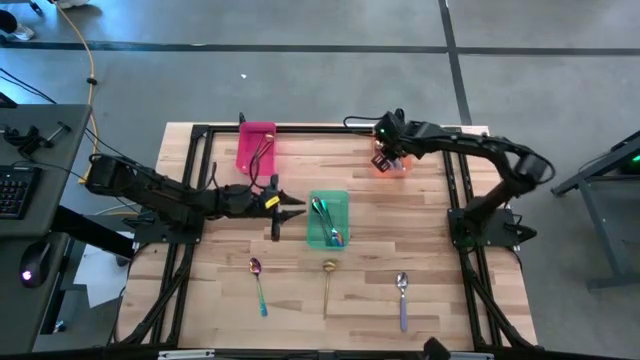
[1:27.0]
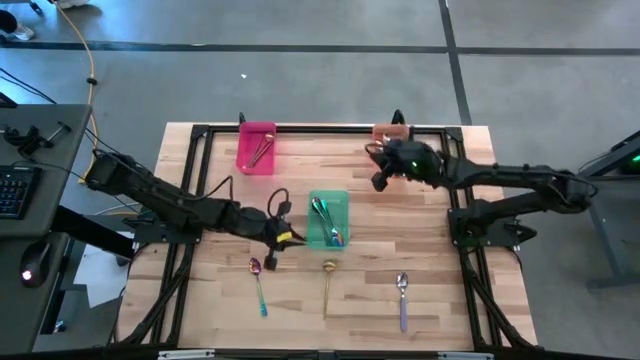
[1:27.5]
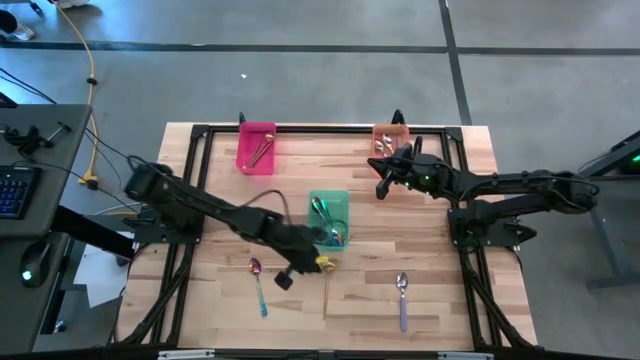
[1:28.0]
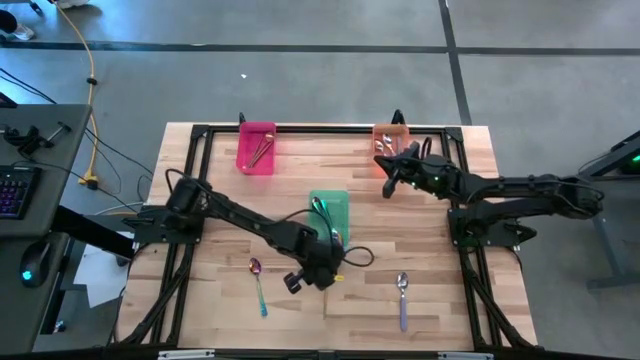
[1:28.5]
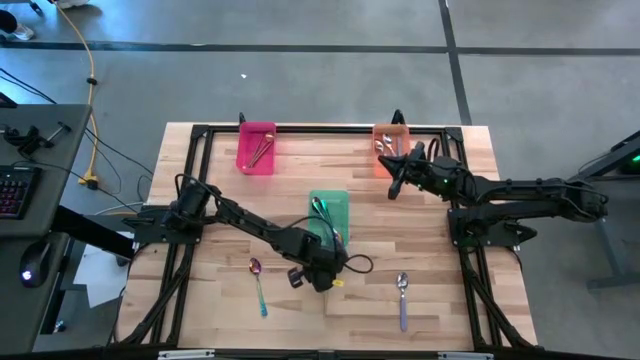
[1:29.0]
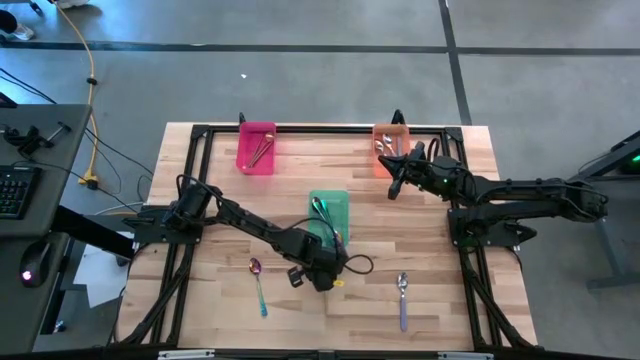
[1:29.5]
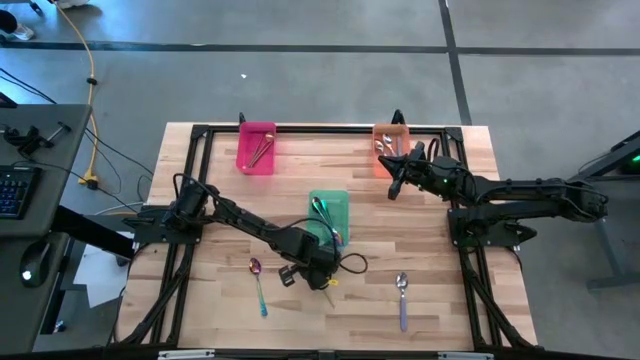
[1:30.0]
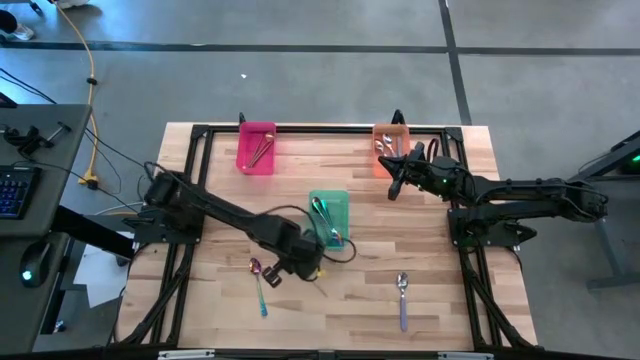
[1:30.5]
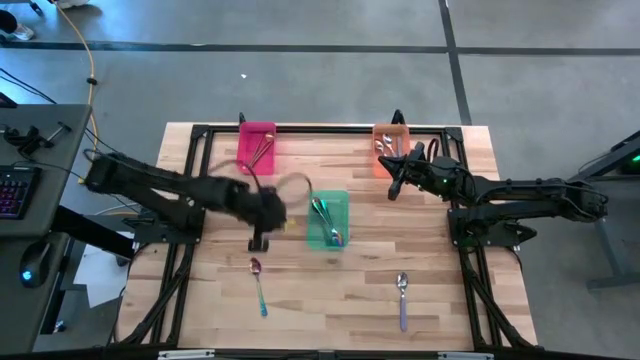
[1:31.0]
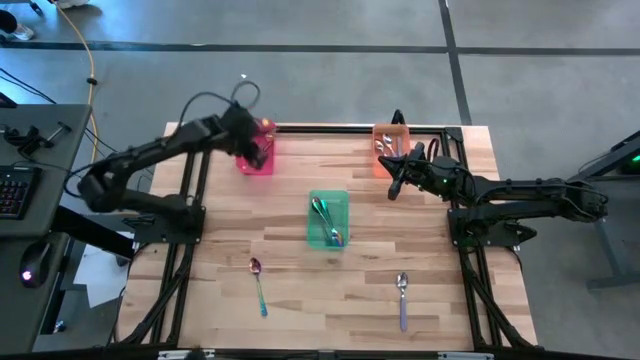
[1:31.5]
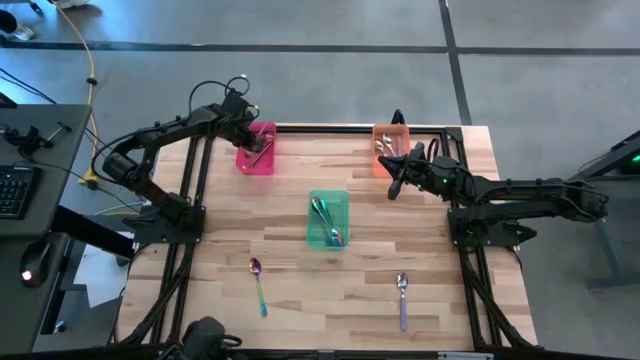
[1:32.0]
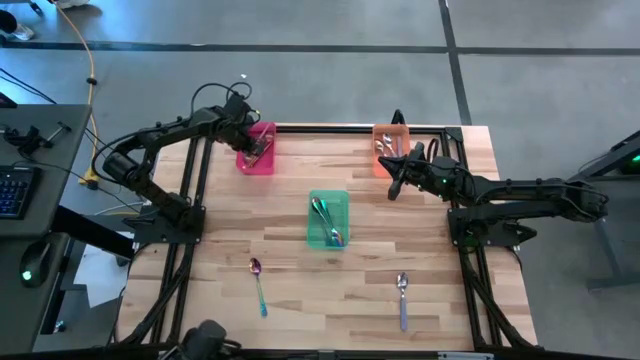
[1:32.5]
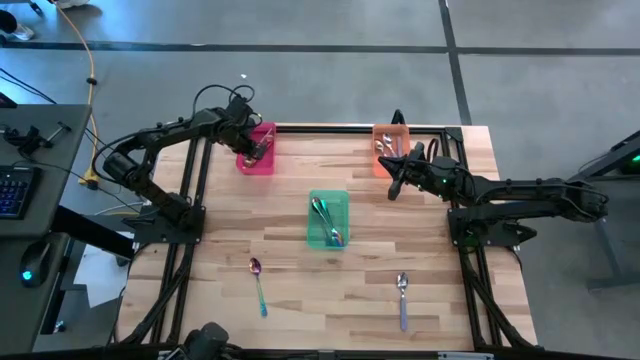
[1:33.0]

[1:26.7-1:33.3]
Task: Sort silverware by color (type)
Put the gold spoon into the pink bin

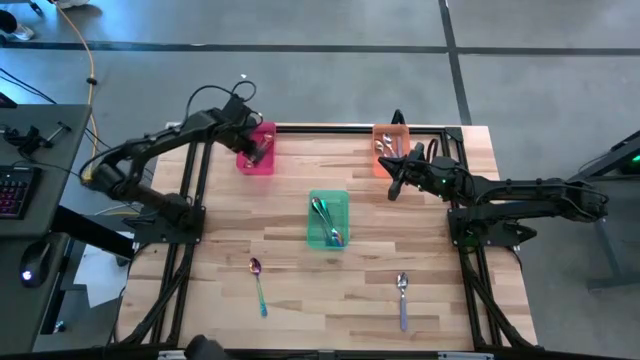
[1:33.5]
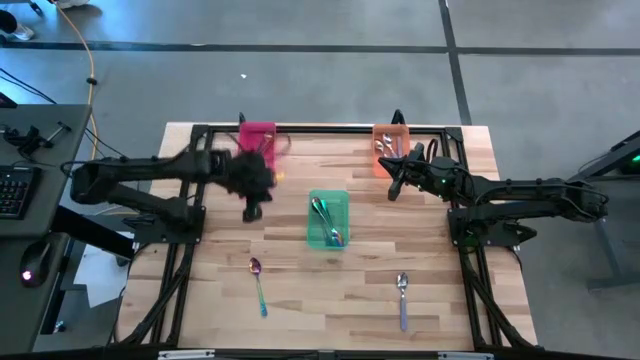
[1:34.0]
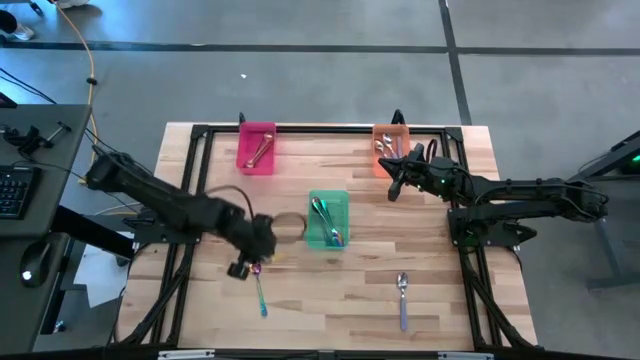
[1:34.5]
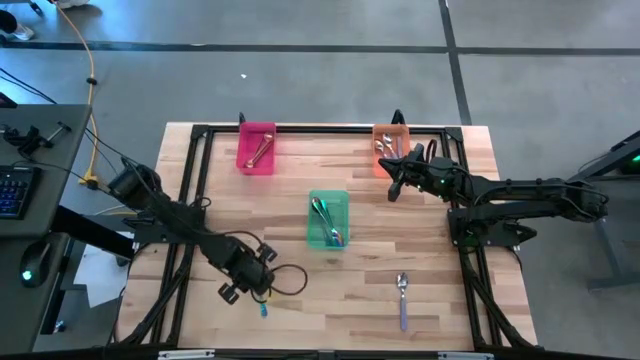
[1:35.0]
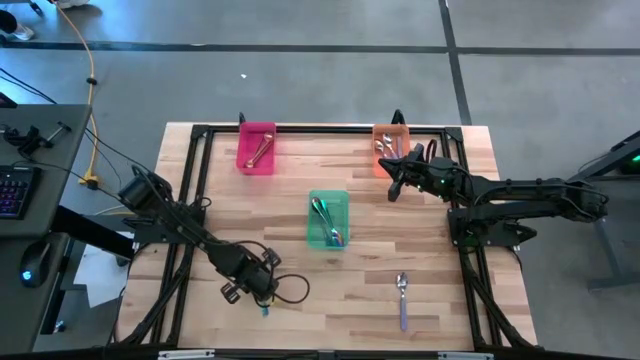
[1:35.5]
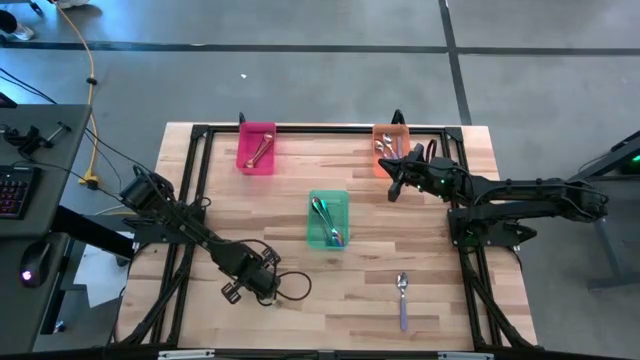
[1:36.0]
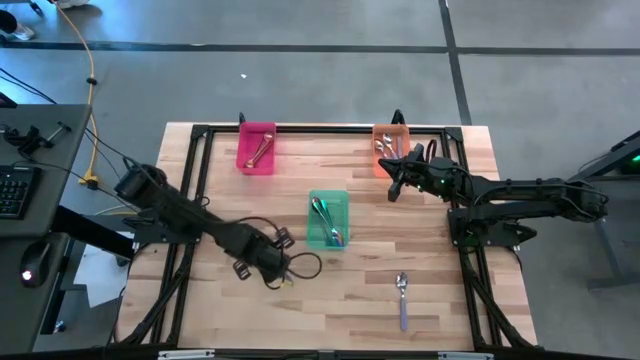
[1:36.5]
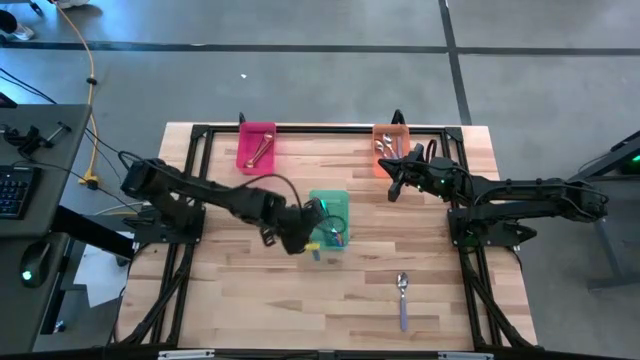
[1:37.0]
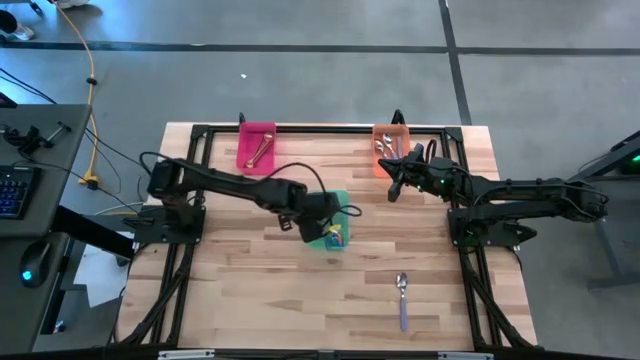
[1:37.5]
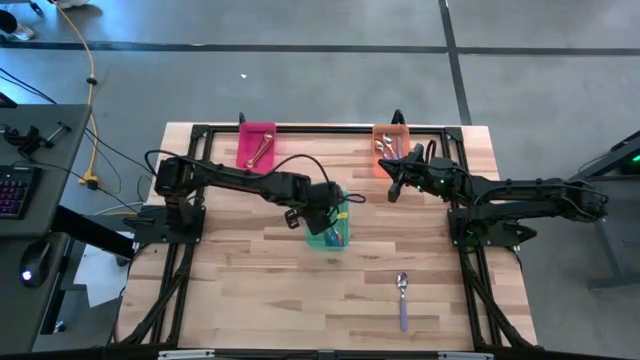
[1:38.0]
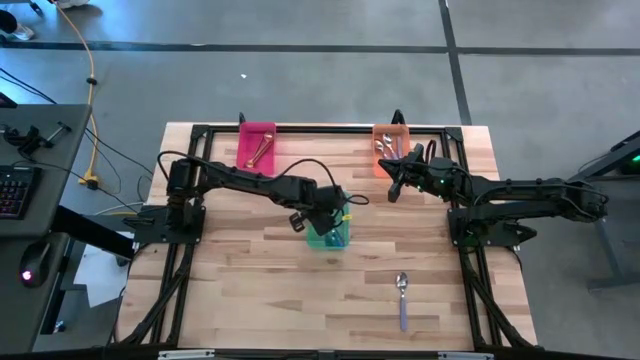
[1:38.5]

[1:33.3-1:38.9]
Put the blue spoon into the green bin

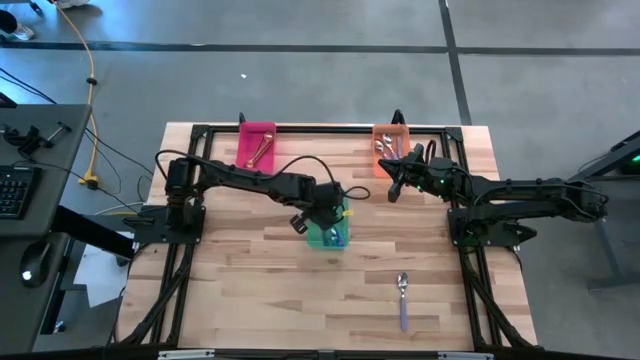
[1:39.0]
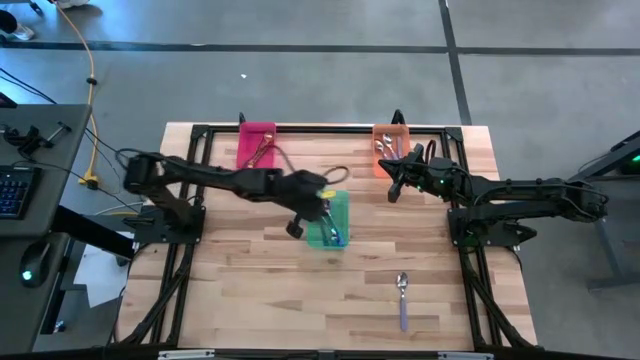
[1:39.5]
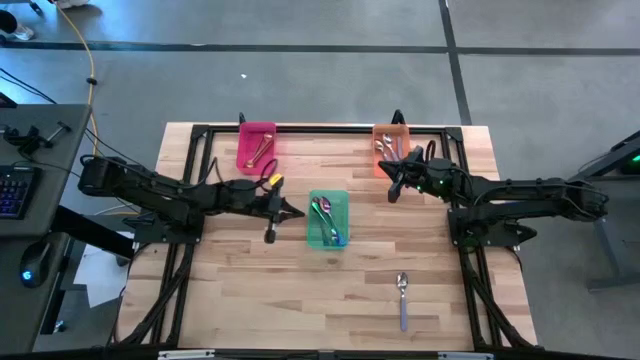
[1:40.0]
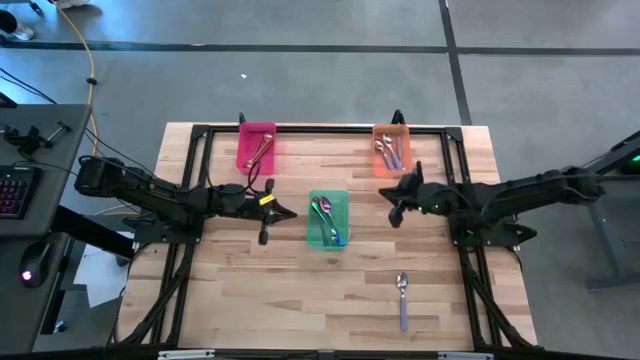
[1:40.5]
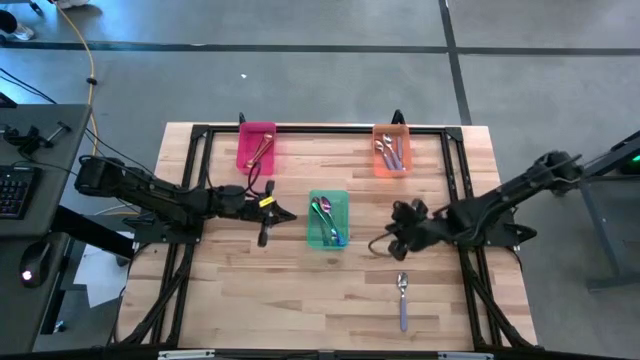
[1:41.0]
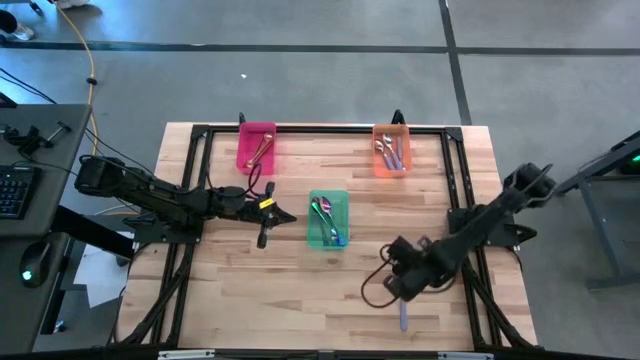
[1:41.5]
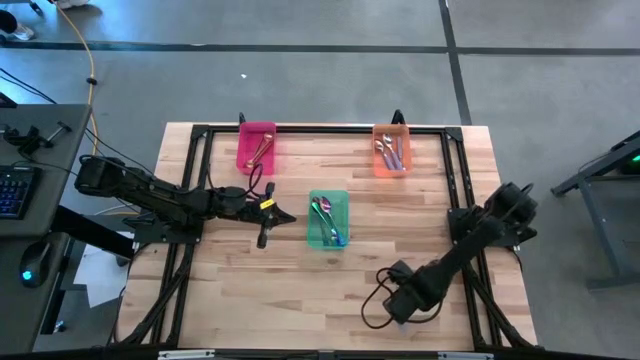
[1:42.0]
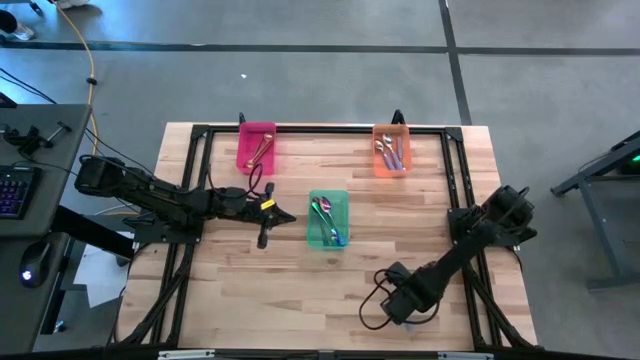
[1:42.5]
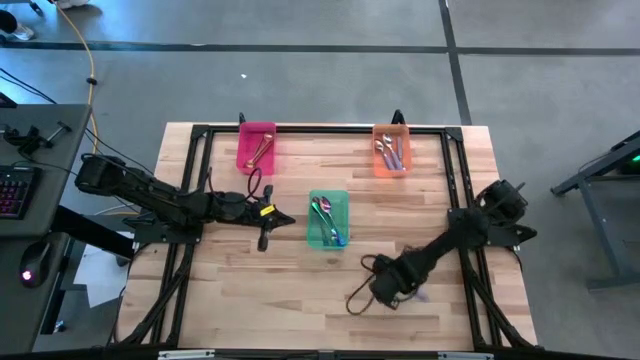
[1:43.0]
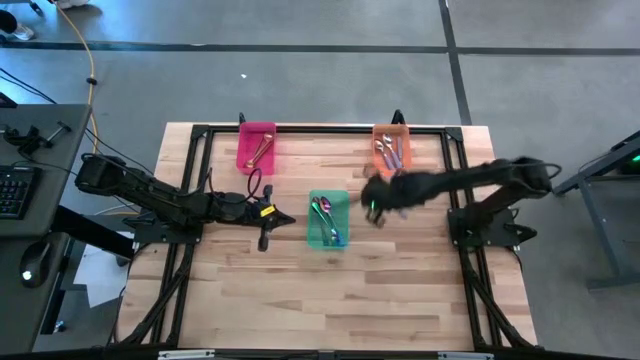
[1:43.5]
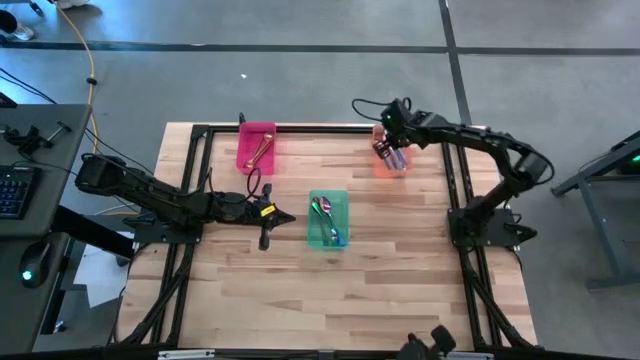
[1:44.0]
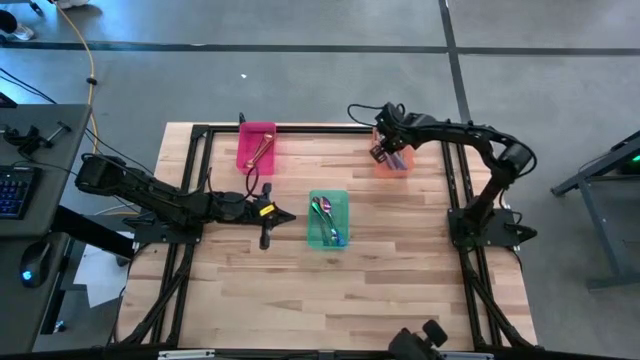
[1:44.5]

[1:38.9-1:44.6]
Put the purple spoon into the orange bin

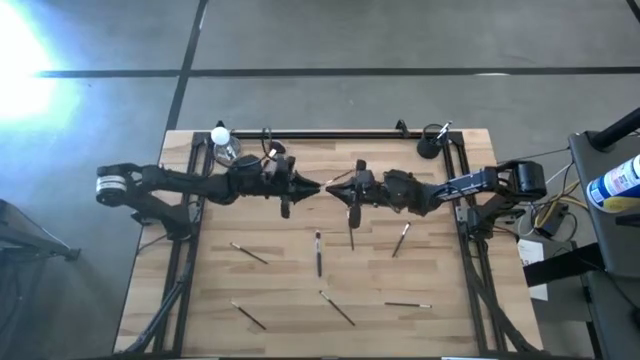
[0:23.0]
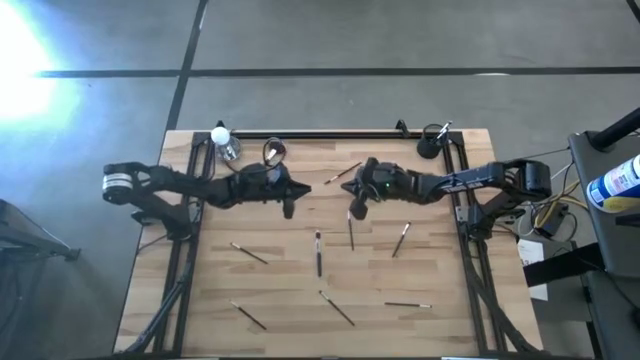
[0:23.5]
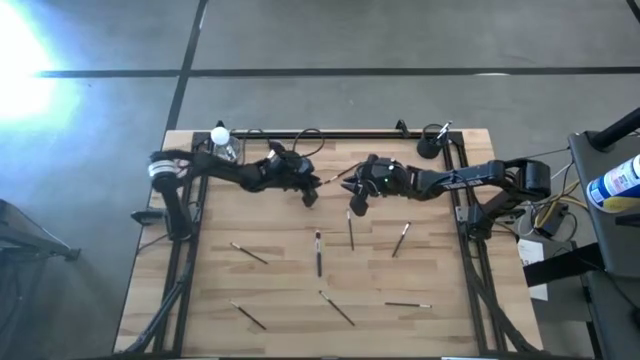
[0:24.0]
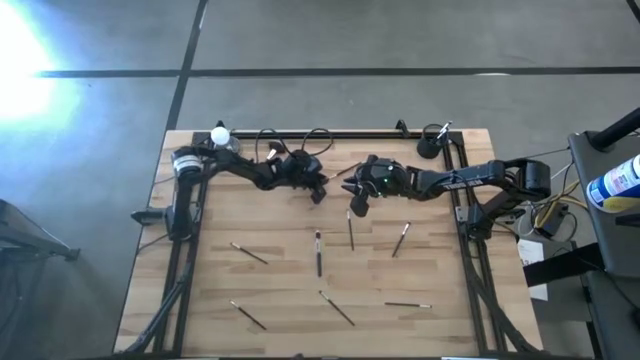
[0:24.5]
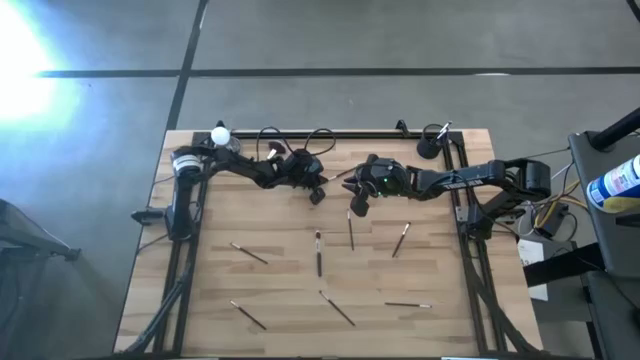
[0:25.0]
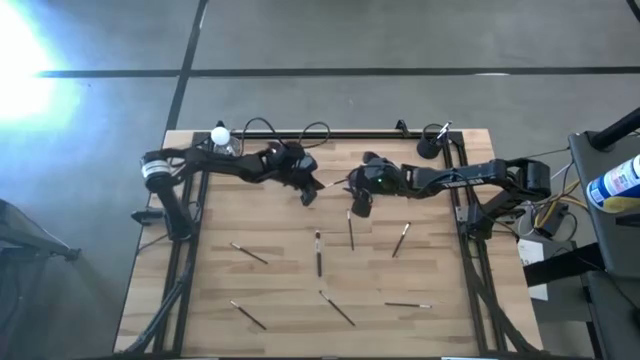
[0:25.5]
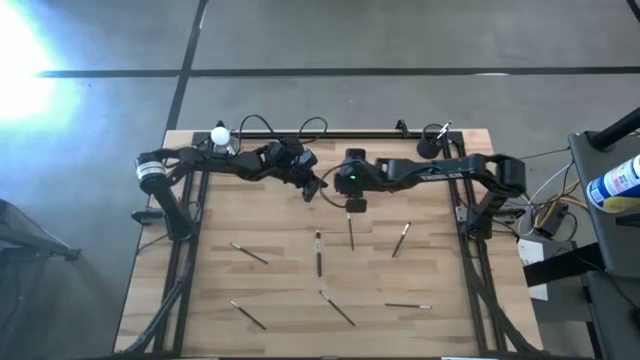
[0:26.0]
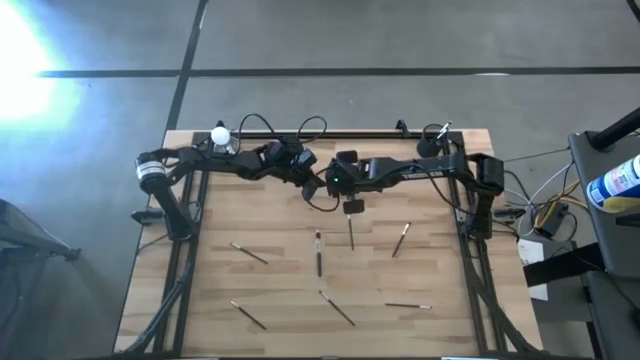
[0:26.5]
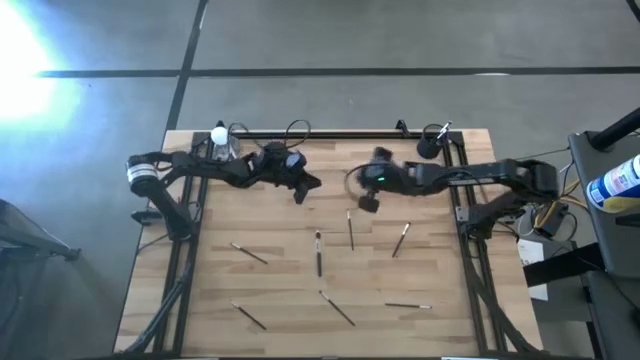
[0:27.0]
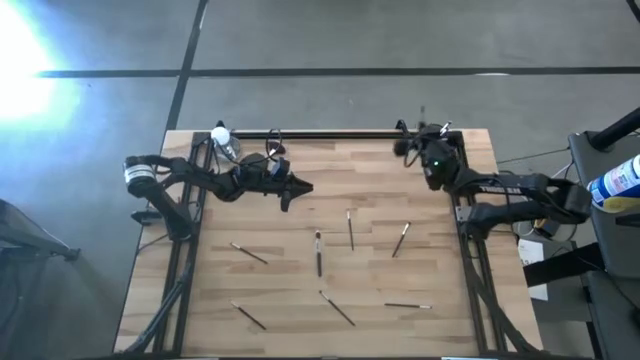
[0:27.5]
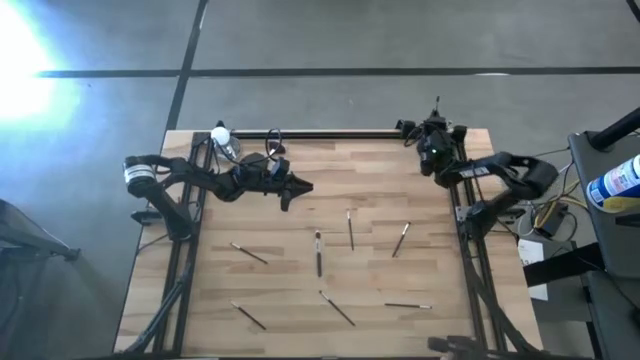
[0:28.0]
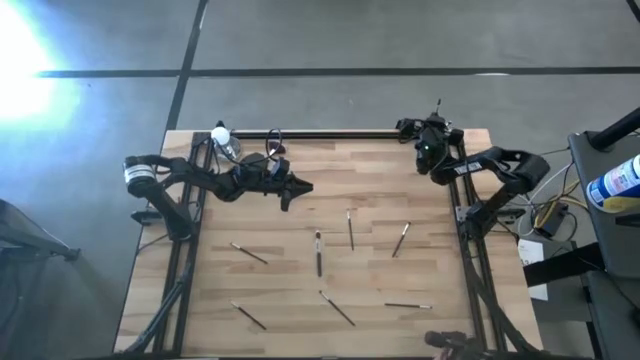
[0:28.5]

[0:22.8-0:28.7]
Task: Put items in baskets/containers
Put the brow brush into the mesh organizer
